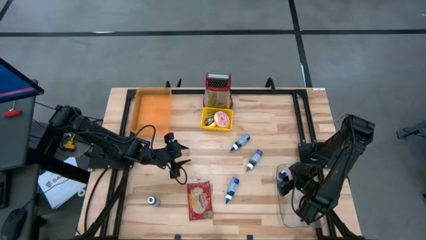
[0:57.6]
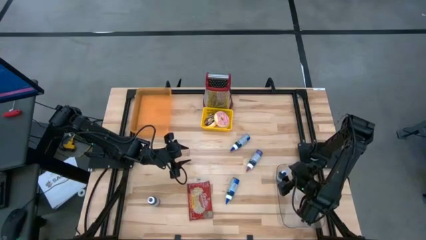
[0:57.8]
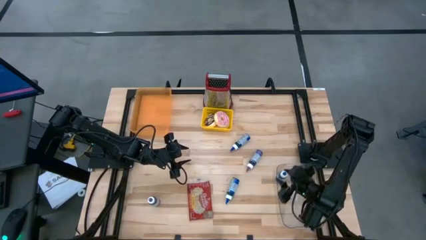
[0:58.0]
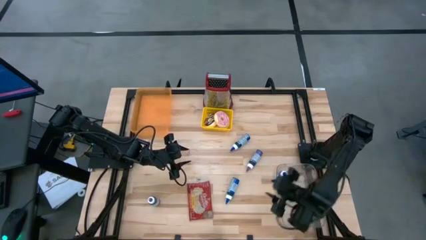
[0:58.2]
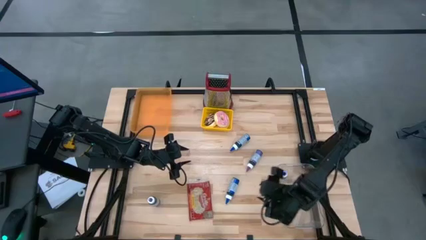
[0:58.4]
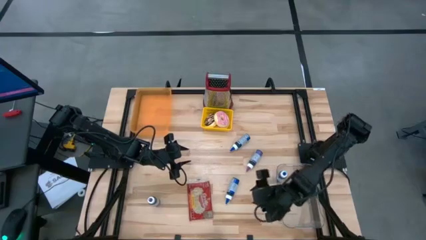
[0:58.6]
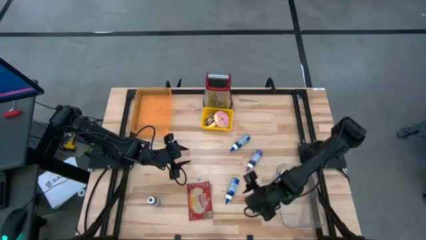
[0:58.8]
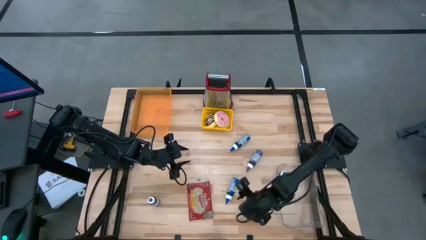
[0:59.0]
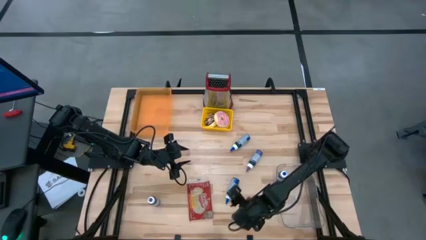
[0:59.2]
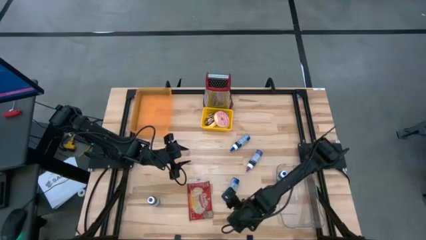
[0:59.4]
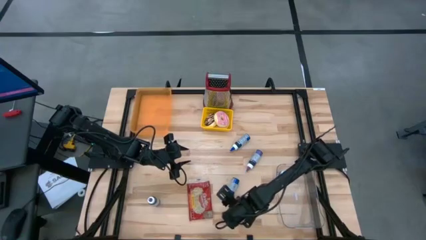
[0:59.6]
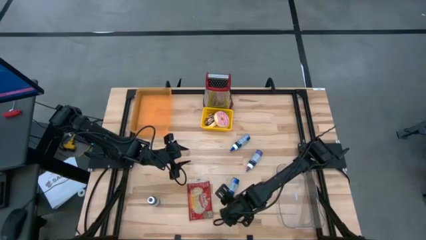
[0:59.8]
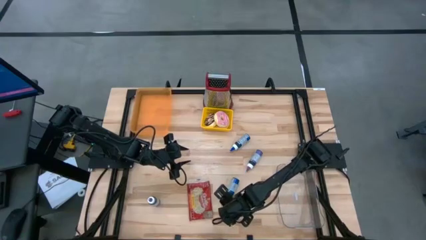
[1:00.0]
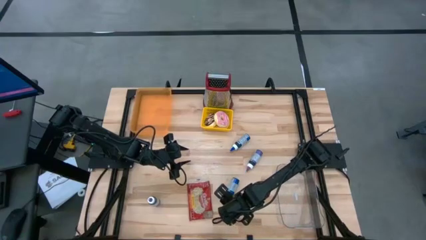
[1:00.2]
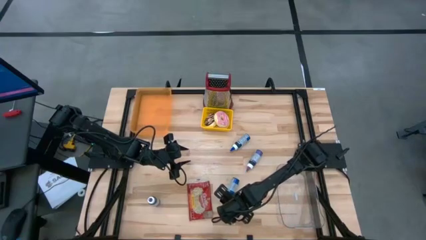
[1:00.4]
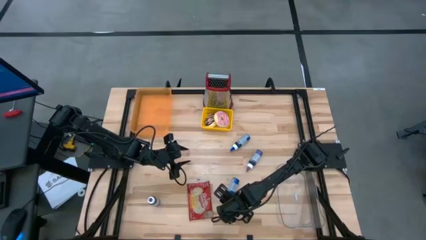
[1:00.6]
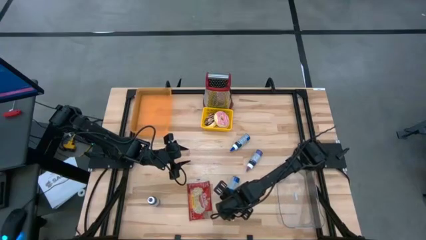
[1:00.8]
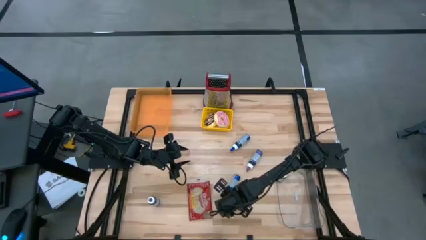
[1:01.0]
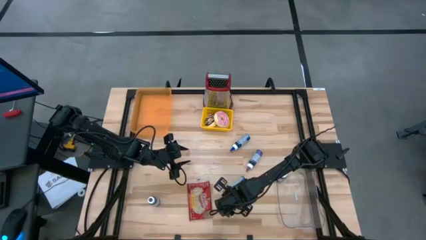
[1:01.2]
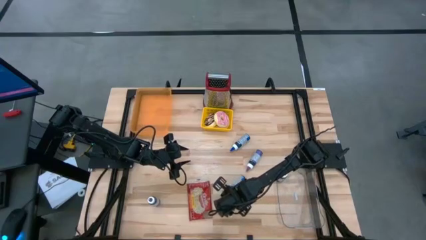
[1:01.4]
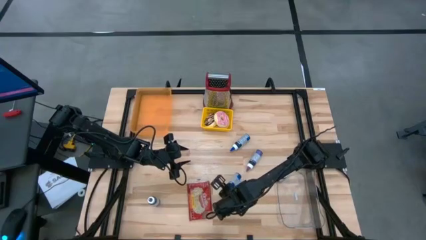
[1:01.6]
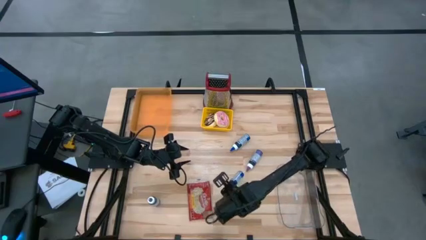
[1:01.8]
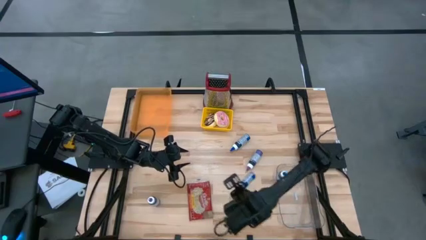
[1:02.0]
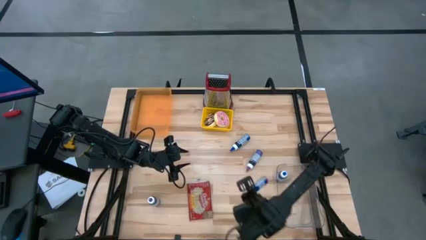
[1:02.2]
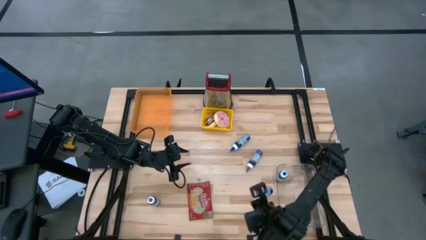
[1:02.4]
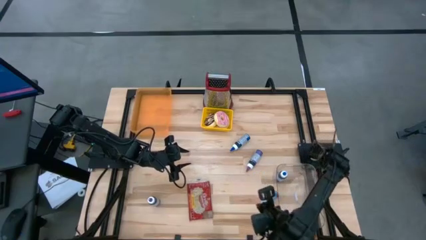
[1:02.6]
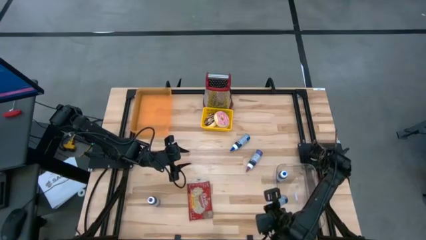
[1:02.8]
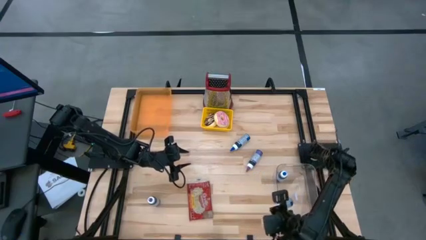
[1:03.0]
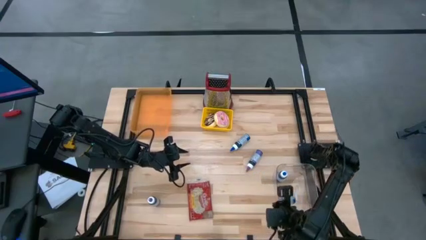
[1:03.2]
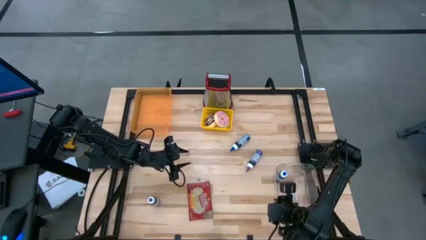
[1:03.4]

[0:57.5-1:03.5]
Put the bottom blue food coloring bottle into the transparent bin

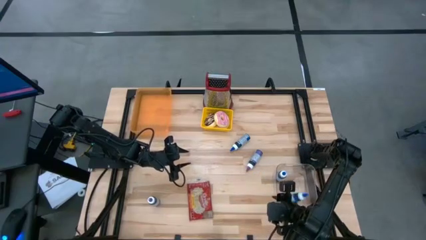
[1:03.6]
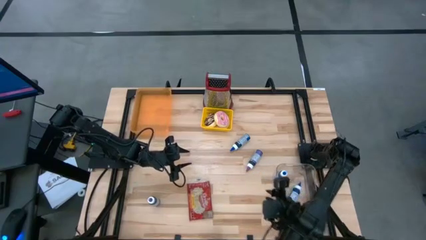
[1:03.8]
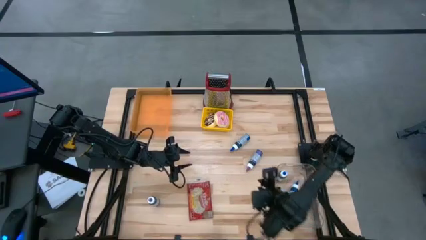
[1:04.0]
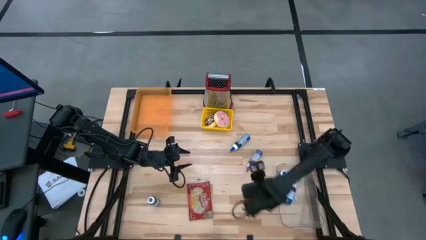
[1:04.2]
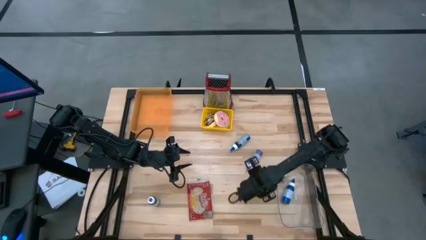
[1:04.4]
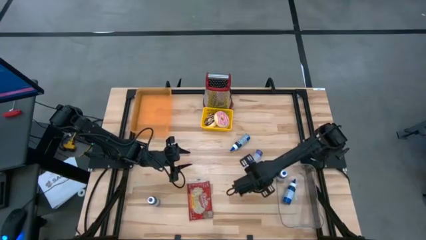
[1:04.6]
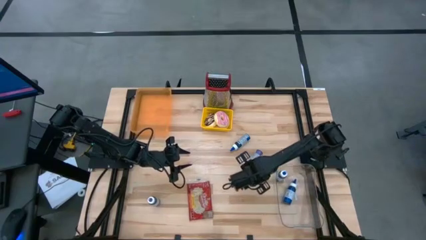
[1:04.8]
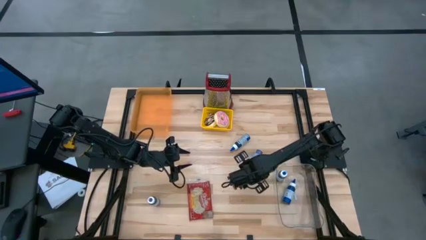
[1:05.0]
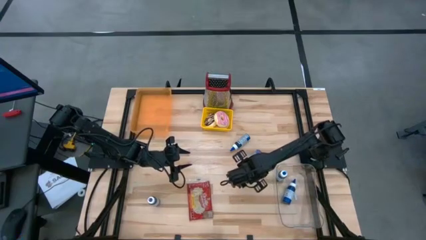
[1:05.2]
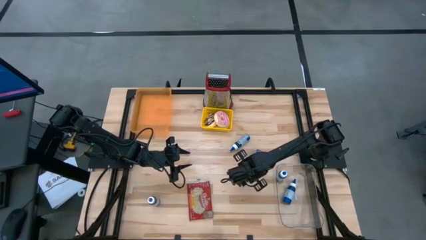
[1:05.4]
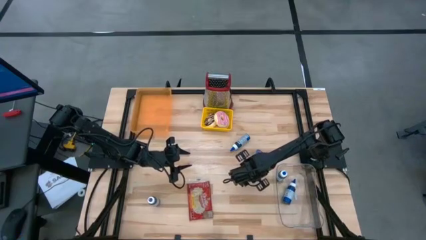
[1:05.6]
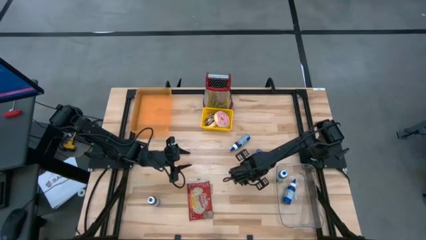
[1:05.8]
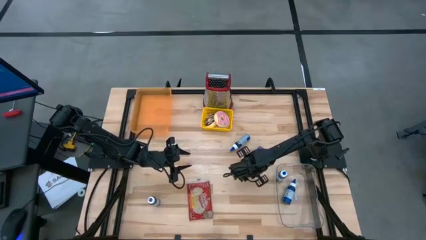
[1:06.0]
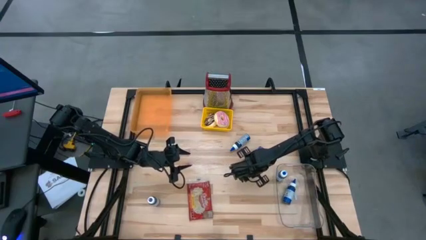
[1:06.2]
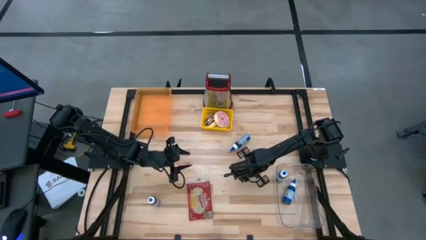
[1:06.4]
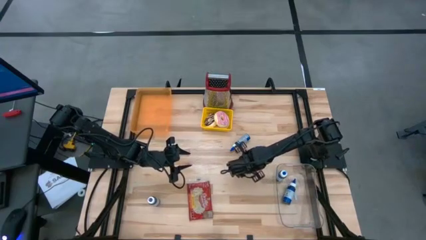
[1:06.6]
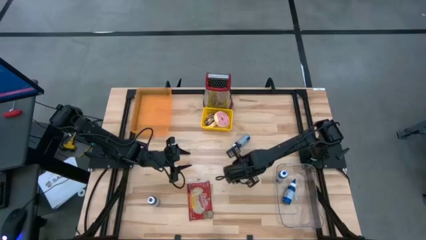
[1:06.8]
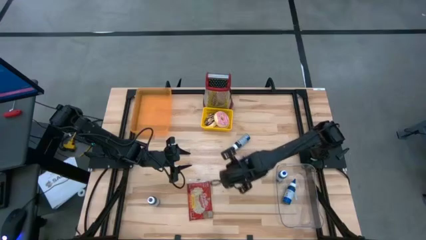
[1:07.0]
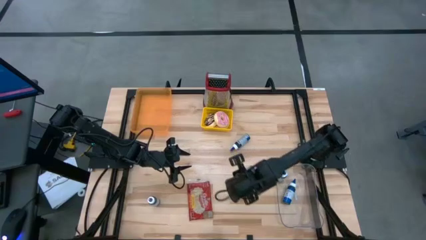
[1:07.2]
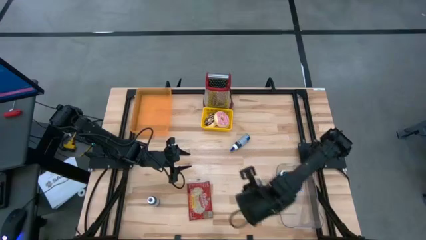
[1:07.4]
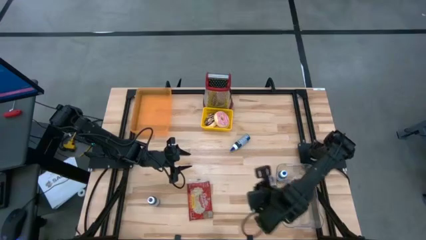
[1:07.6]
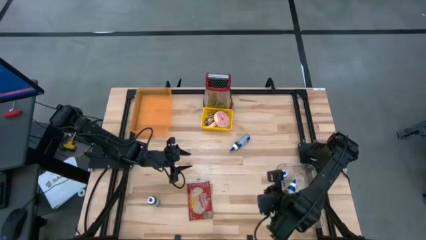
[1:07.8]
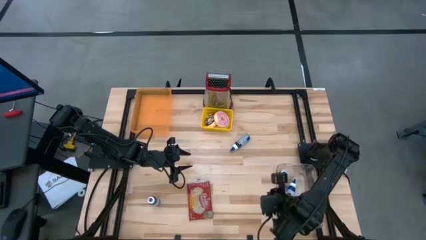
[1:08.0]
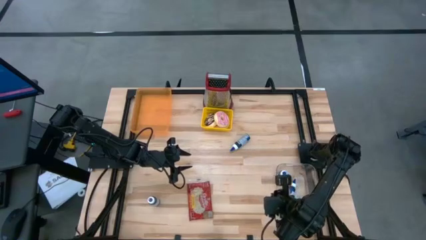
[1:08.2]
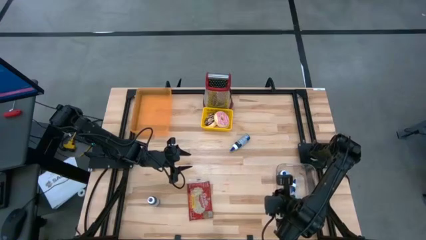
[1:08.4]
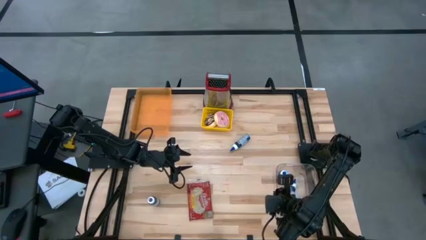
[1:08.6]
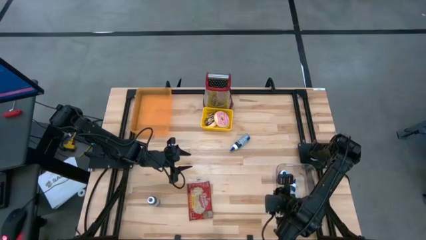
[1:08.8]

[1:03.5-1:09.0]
Put the right violet food coloring bottle into the transparent bin

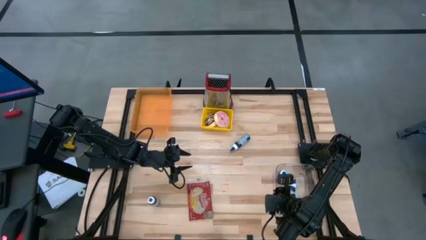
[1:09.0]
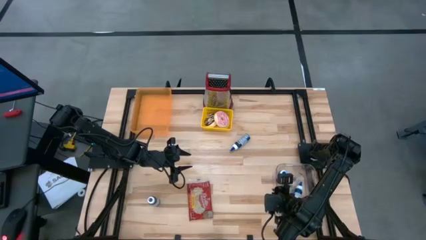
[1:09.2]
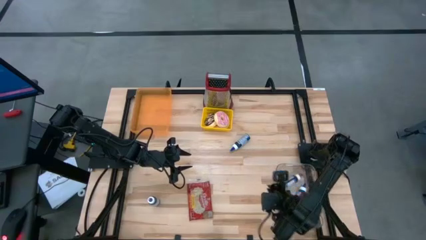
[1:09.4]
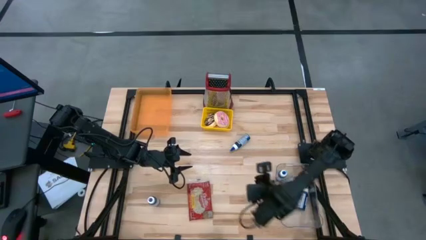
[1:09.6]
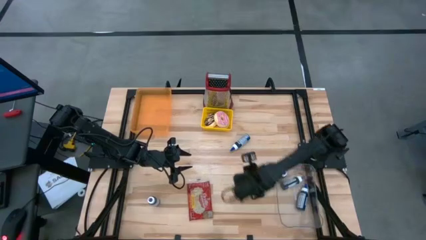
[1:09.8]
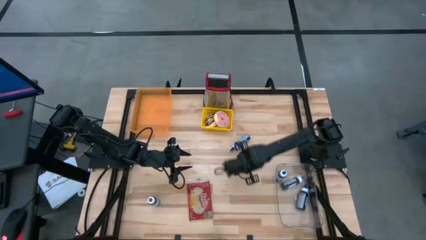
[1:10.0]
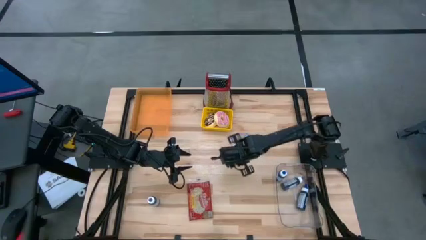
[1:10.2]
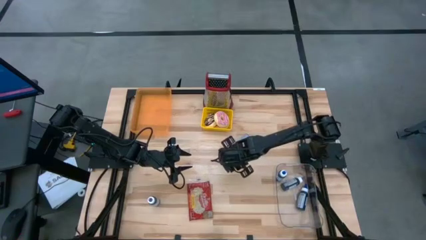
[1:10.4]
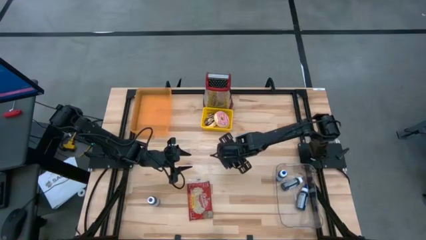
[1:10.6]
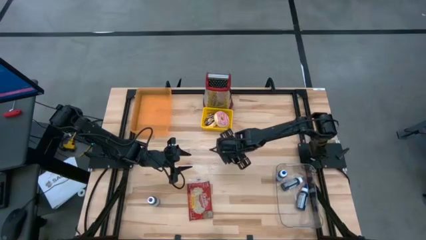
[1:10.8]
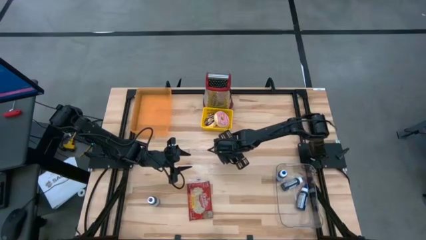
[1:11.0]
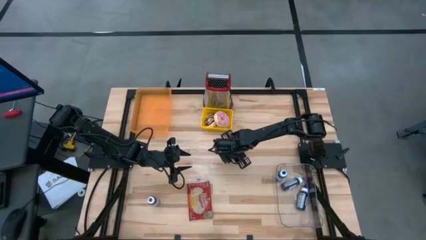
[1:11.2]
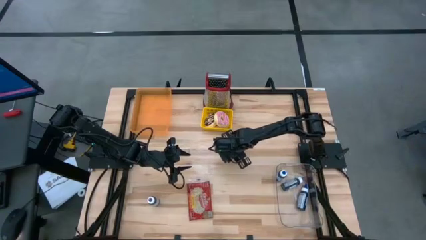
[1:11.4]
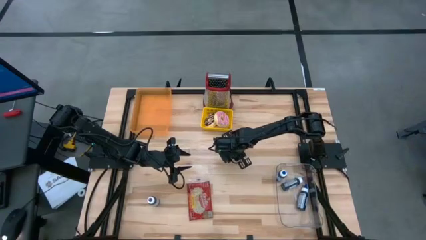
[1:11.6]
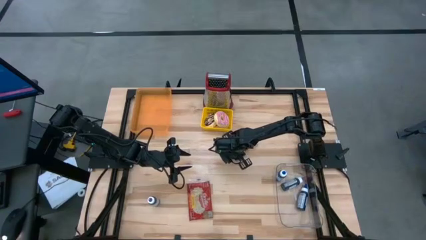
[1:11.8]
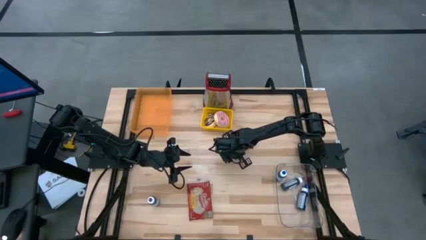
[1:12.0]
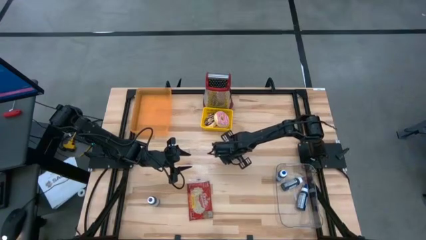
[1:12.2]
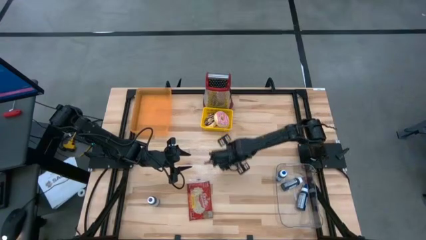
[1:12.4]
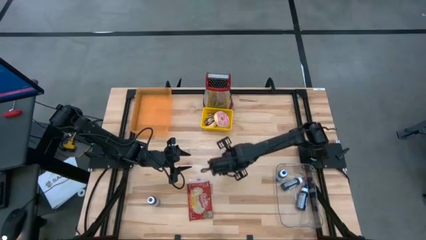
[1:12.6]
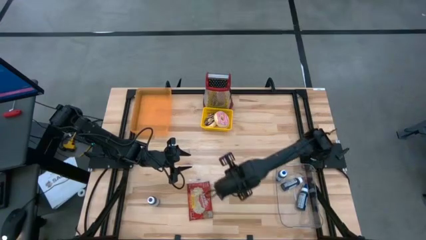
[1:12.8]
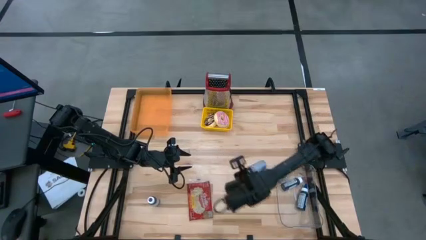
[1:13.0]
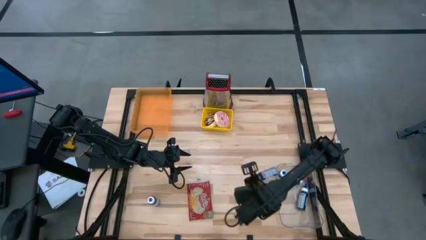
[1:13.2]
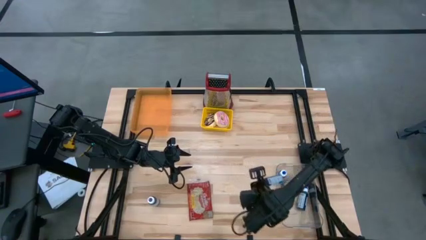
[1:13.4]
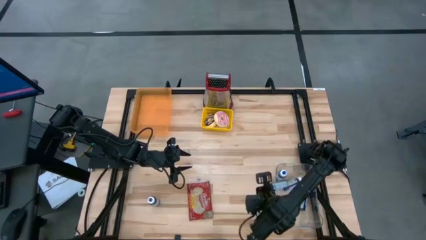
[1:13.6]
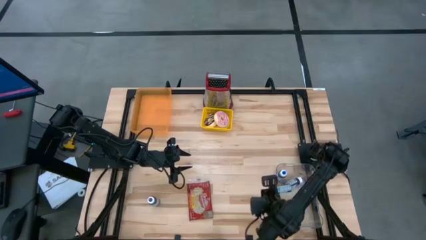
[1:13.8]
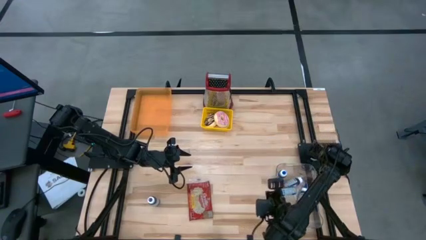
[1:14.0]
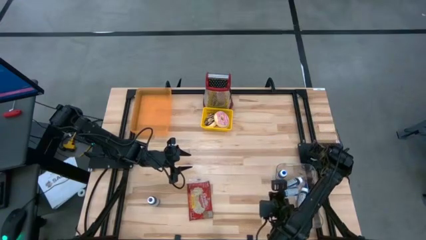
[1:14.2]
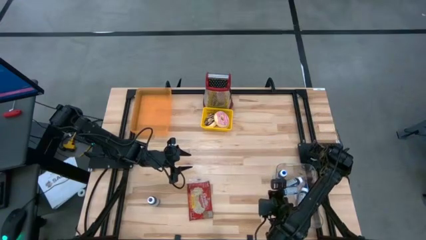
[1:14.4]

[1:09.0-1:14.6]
Put the blue food coloring bottle into the transparent bin
